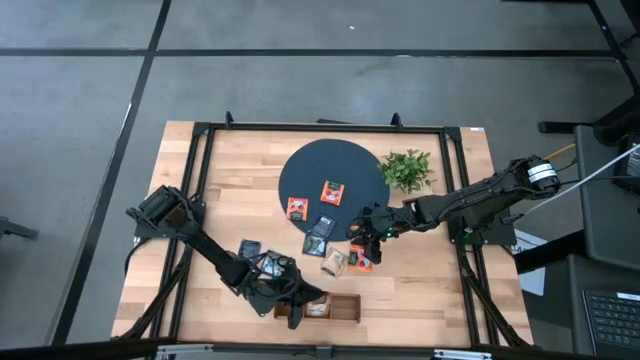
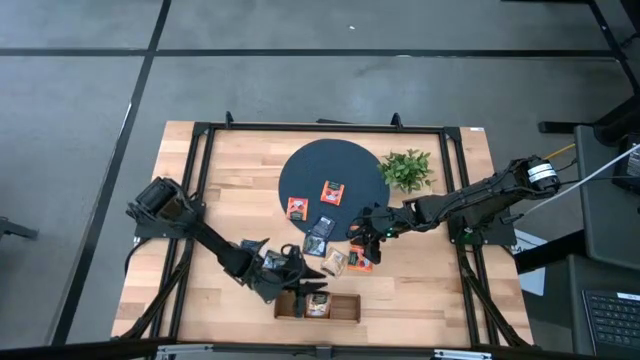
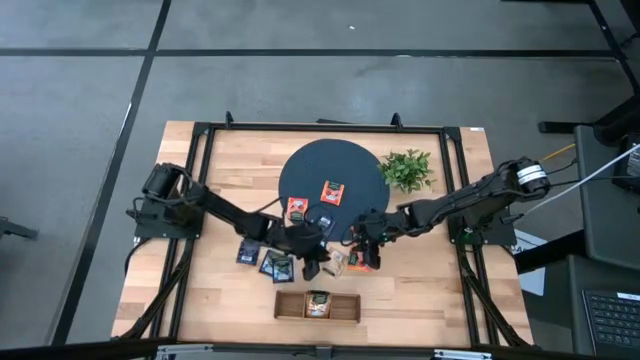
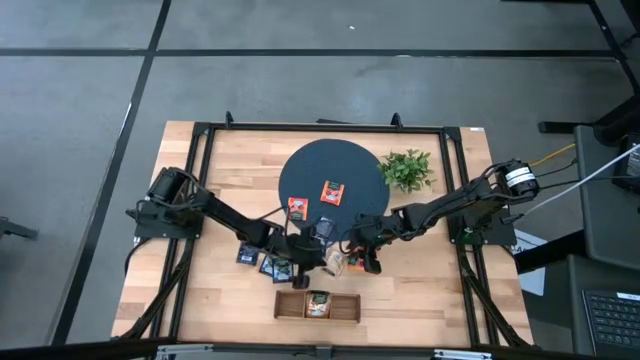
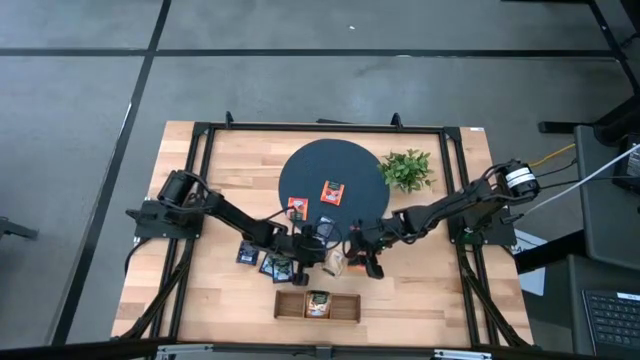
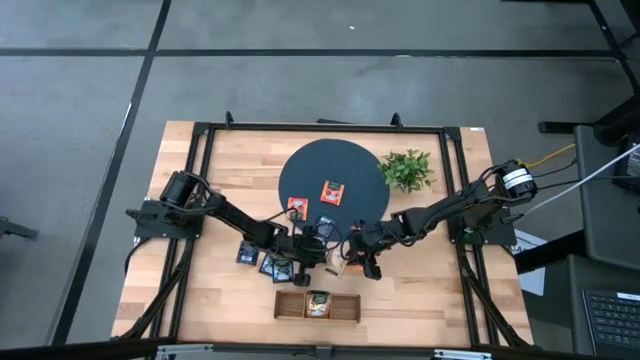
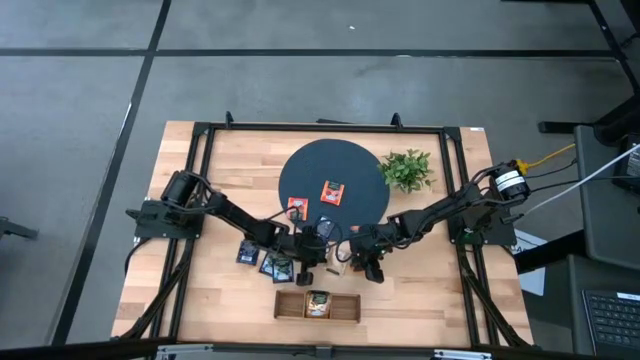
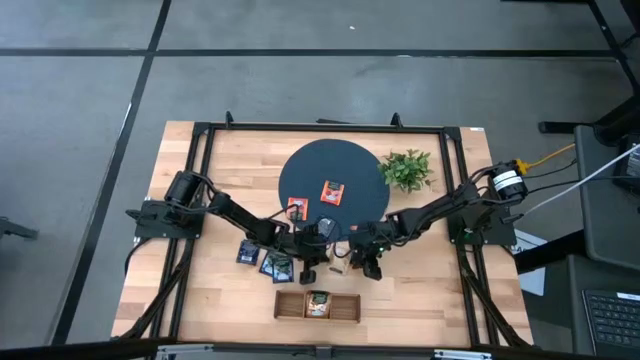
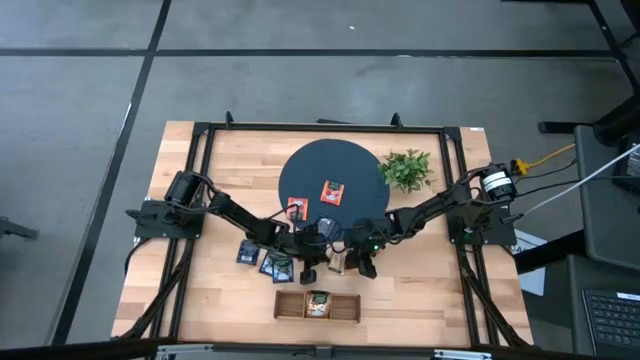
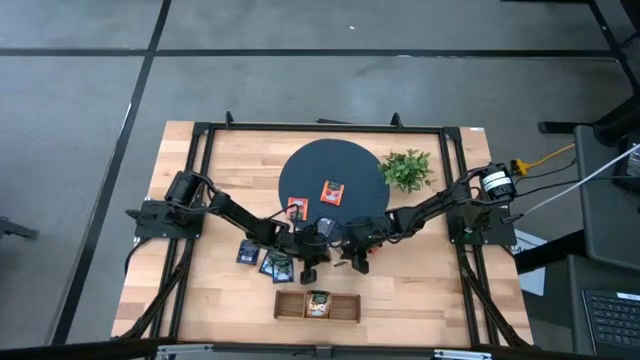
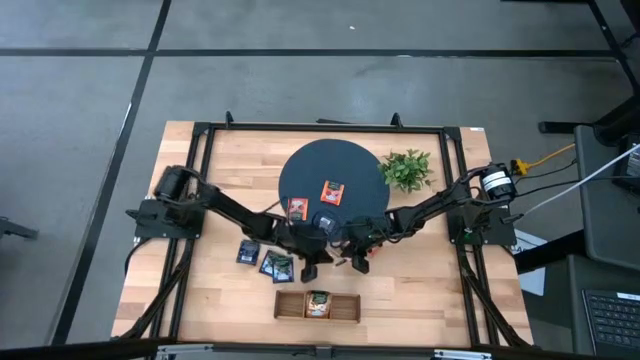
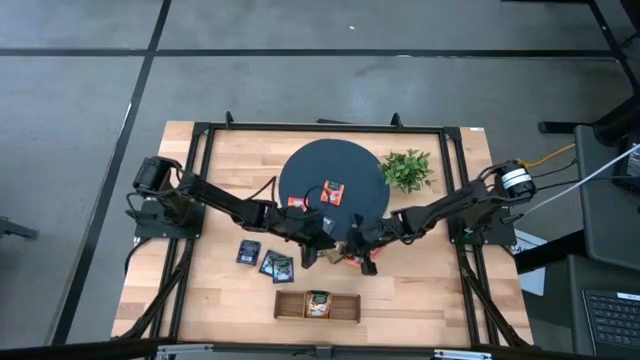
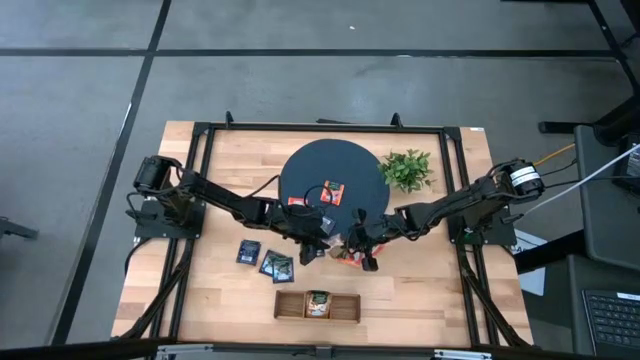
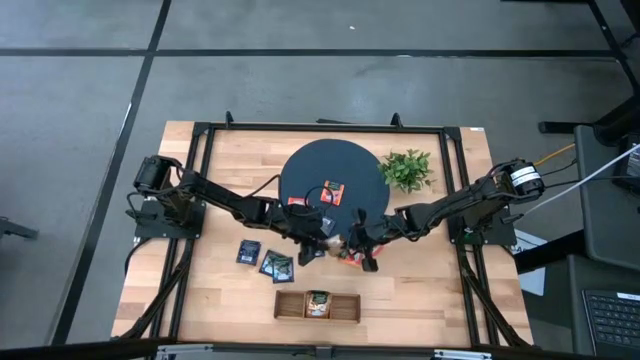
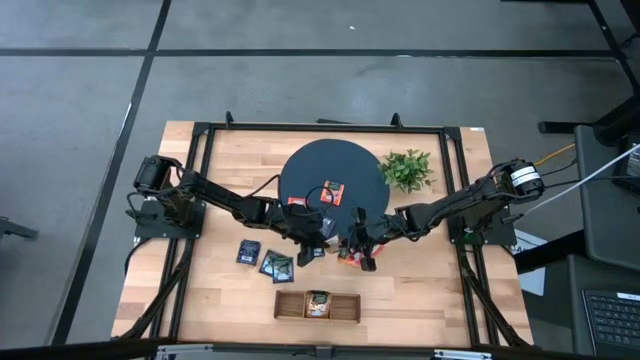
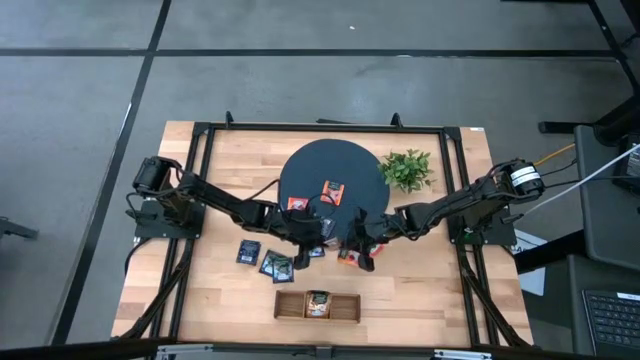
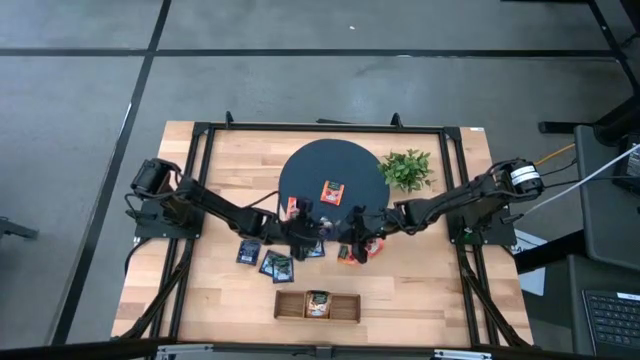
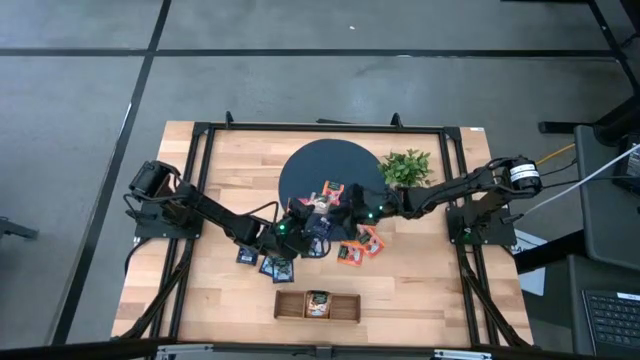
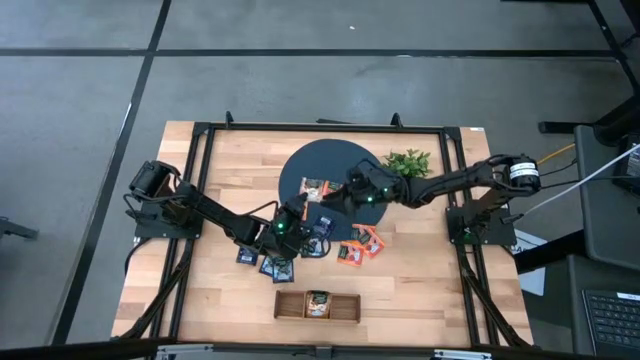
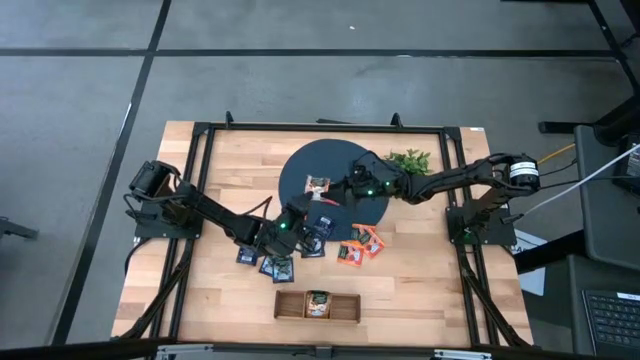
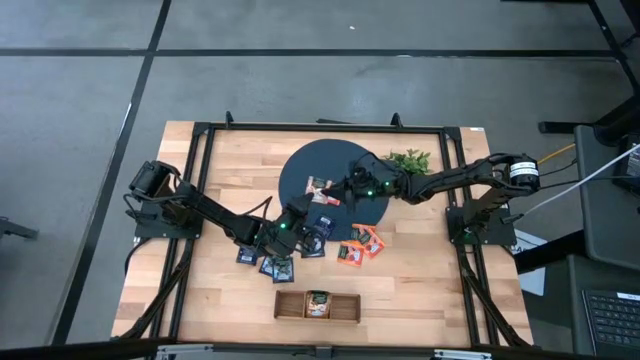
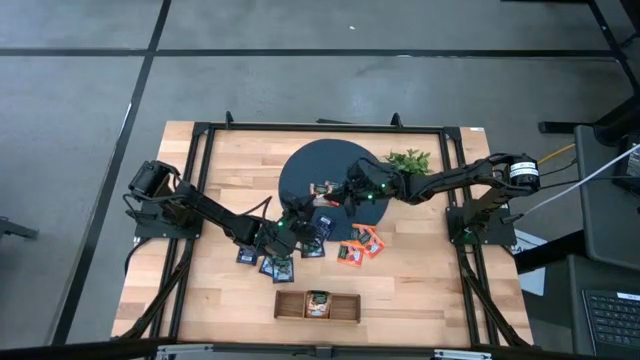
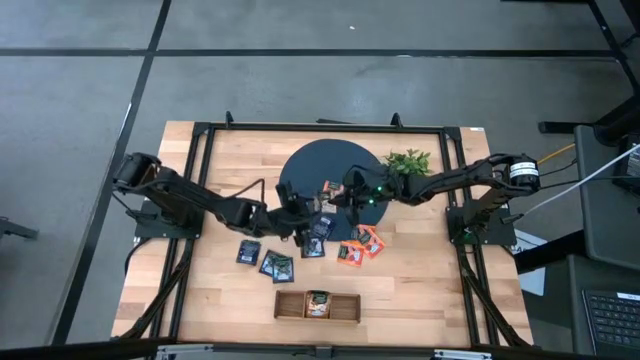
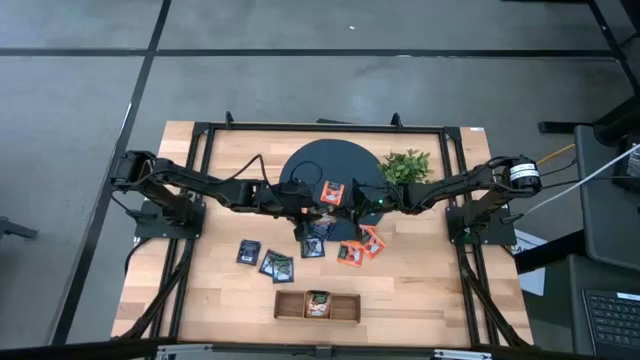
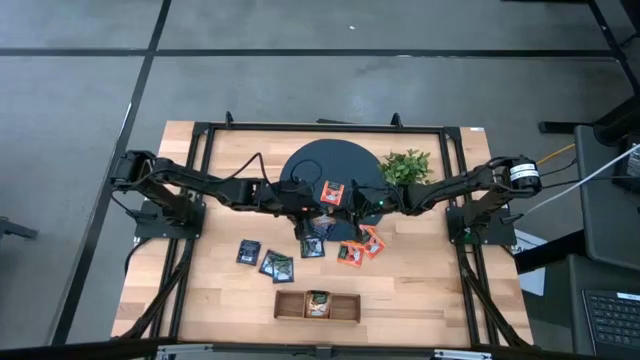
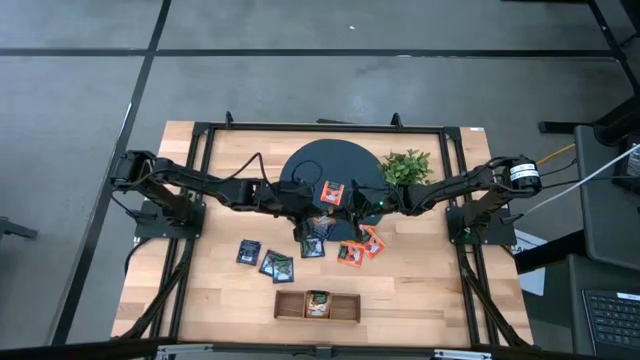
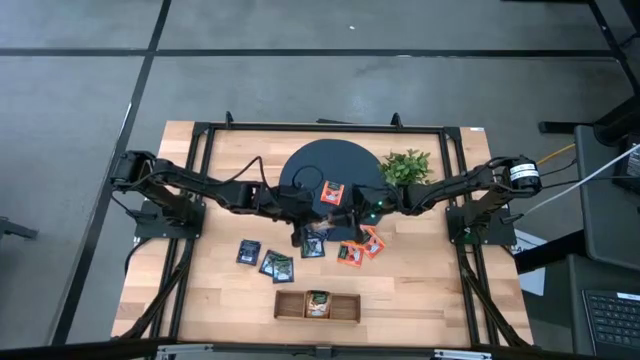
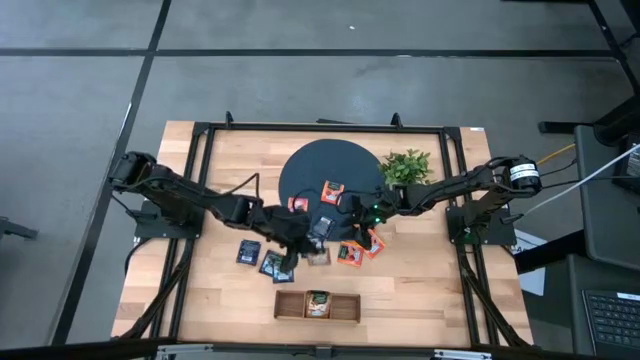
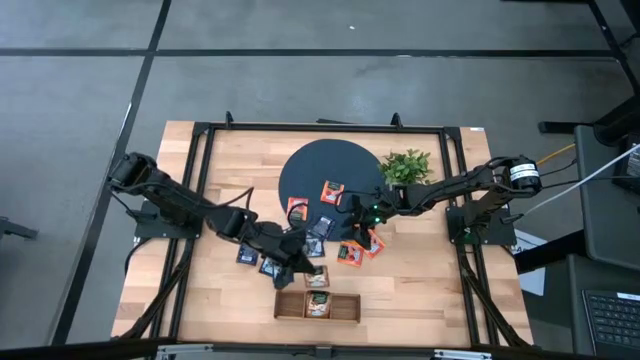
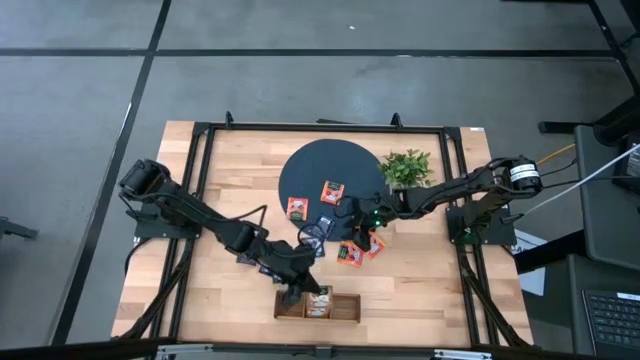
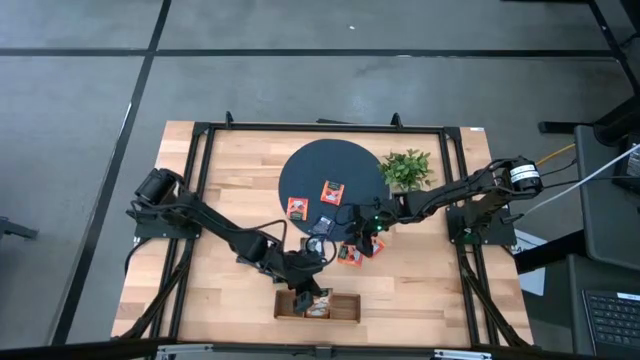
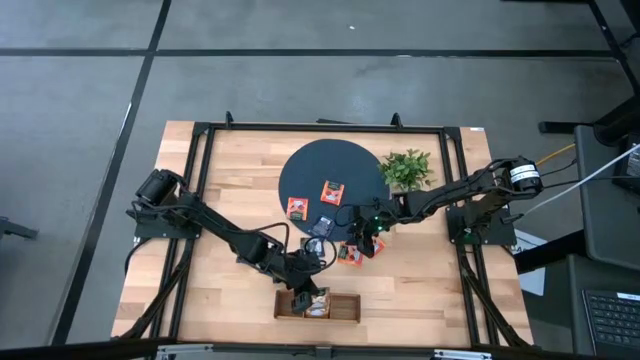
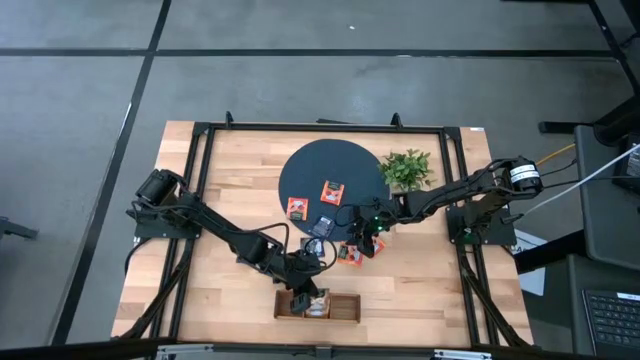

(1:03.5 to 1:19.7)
Task: Pick & Place Tea
Put the brown tea bag into the middle section of the wooden organizer
